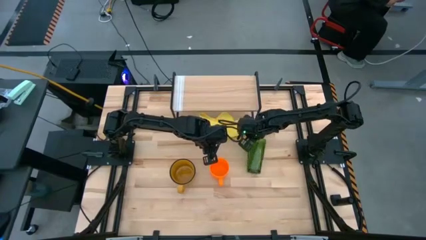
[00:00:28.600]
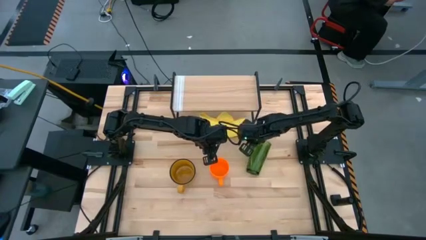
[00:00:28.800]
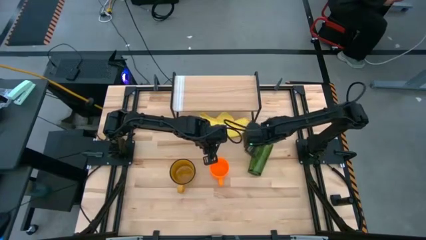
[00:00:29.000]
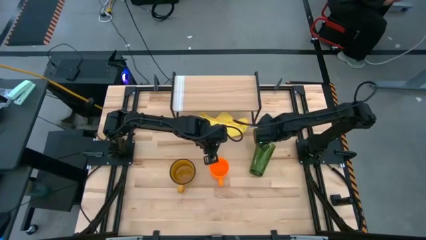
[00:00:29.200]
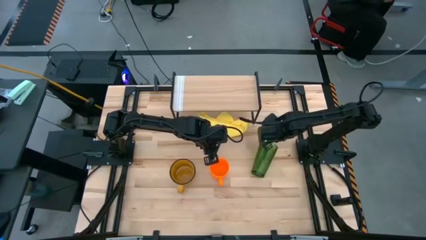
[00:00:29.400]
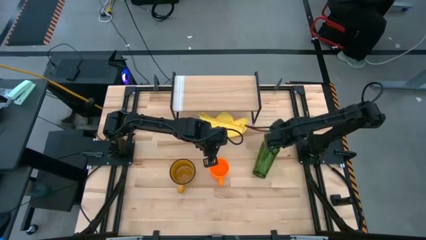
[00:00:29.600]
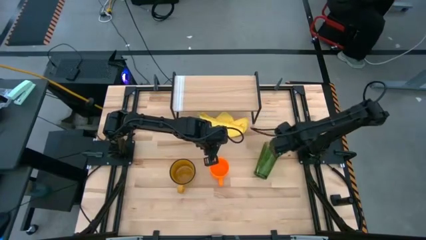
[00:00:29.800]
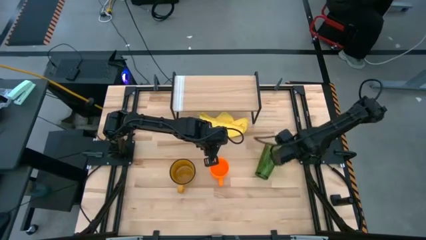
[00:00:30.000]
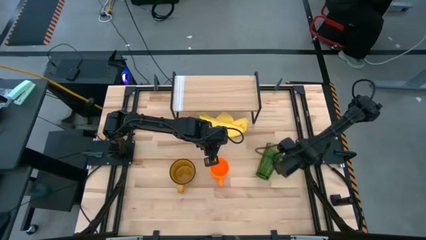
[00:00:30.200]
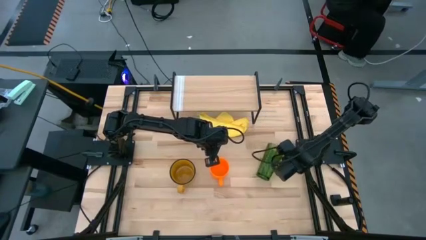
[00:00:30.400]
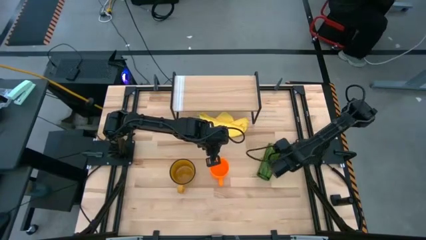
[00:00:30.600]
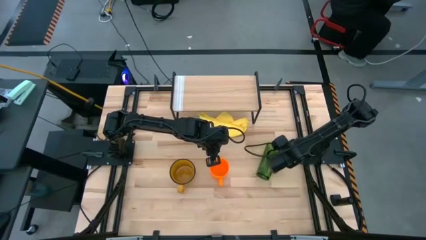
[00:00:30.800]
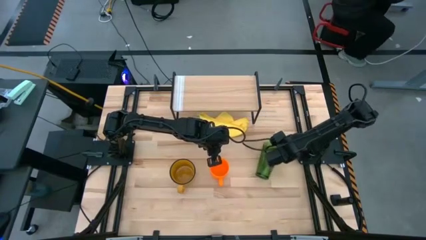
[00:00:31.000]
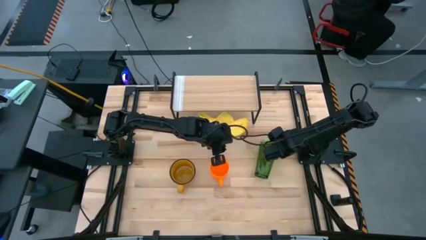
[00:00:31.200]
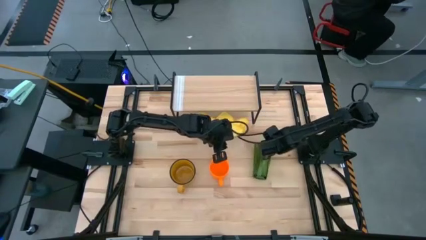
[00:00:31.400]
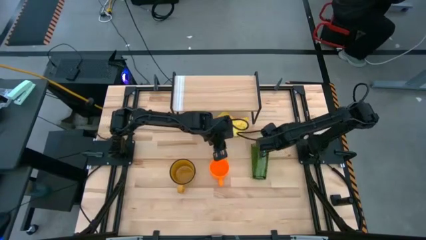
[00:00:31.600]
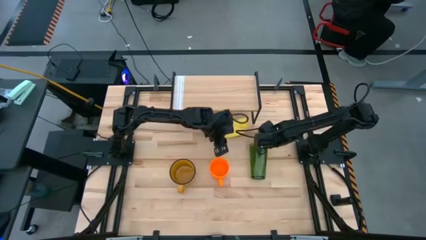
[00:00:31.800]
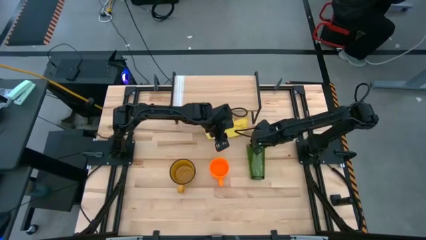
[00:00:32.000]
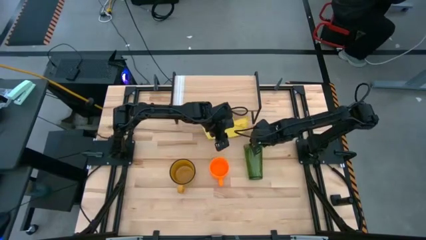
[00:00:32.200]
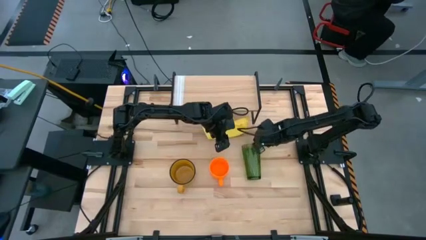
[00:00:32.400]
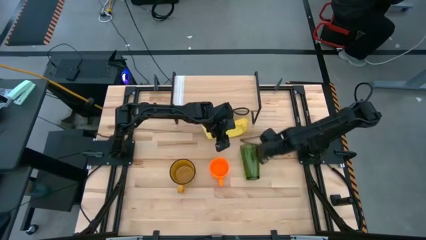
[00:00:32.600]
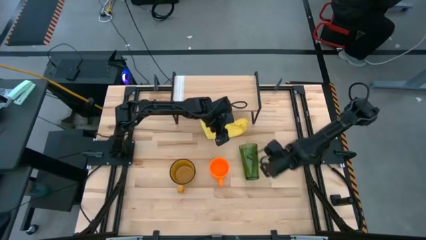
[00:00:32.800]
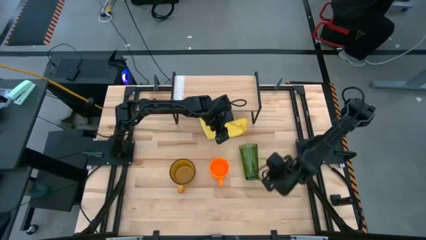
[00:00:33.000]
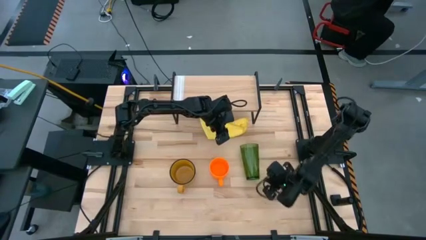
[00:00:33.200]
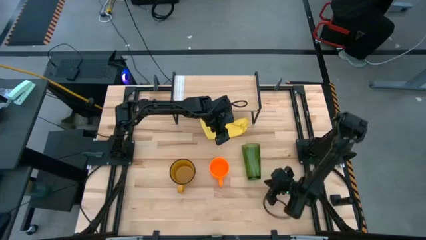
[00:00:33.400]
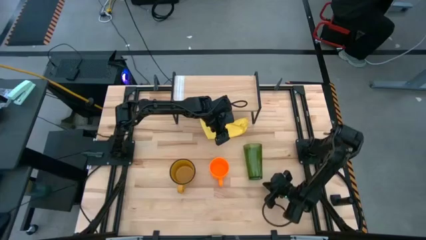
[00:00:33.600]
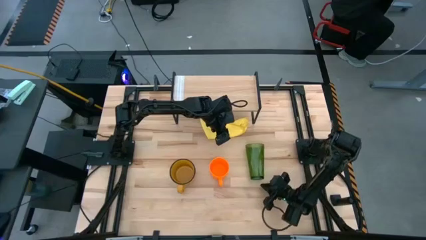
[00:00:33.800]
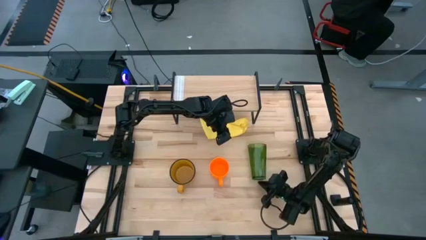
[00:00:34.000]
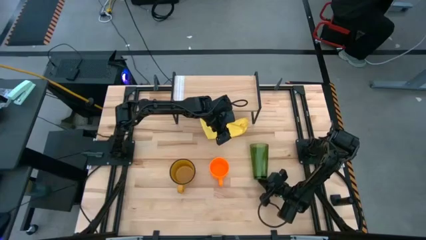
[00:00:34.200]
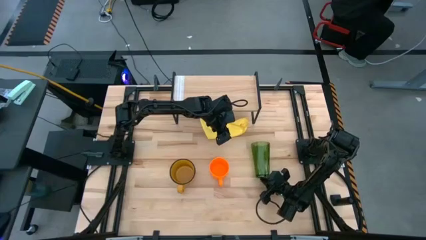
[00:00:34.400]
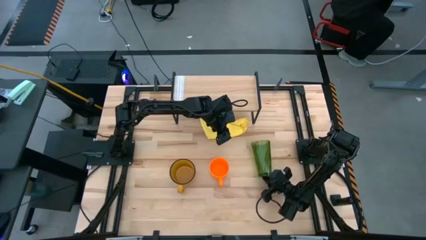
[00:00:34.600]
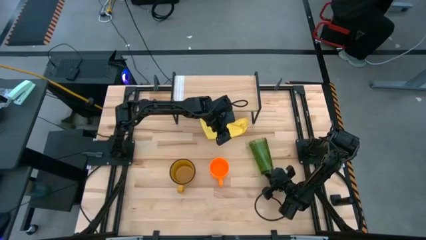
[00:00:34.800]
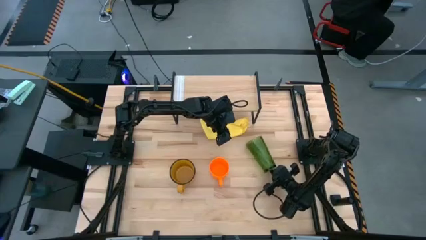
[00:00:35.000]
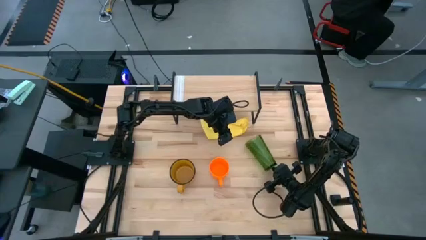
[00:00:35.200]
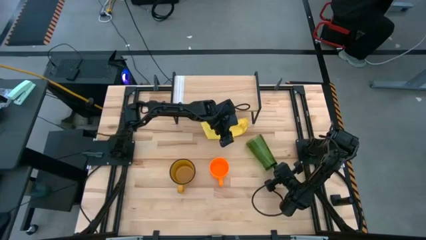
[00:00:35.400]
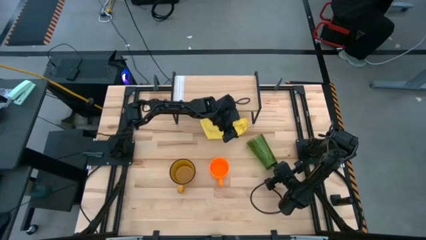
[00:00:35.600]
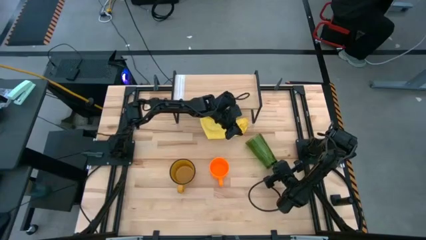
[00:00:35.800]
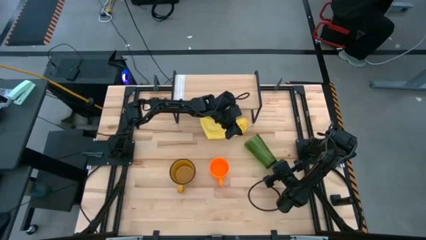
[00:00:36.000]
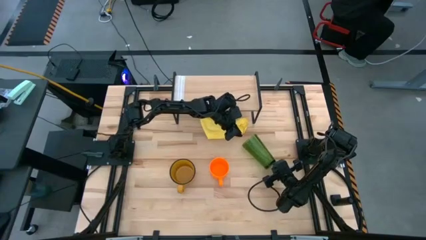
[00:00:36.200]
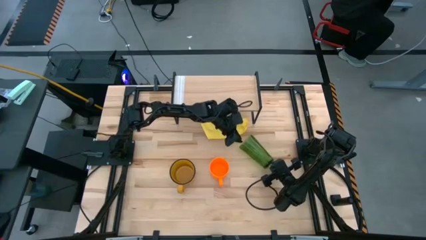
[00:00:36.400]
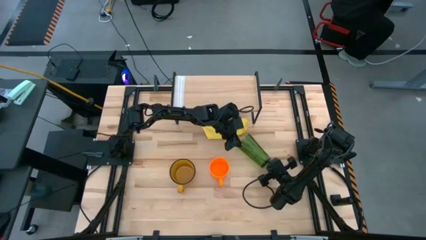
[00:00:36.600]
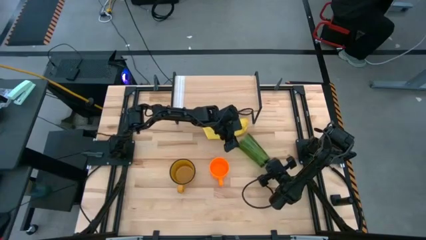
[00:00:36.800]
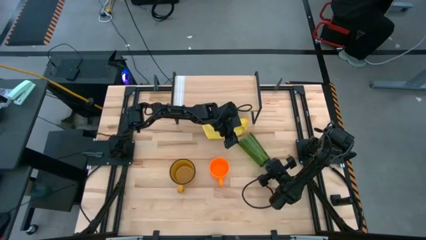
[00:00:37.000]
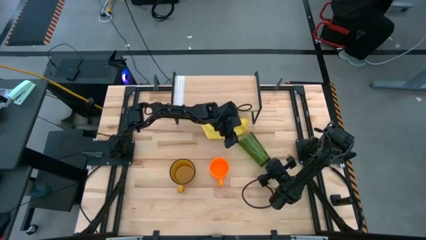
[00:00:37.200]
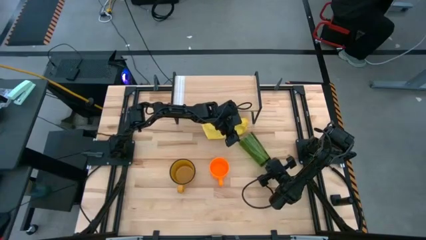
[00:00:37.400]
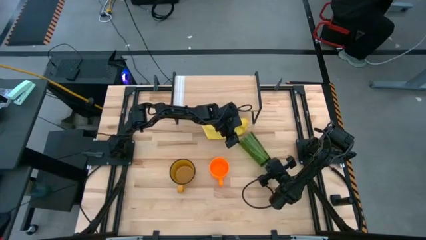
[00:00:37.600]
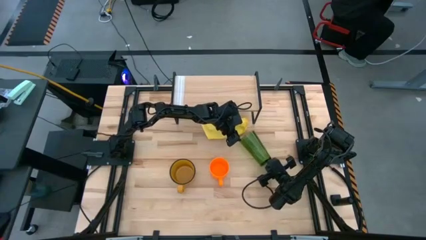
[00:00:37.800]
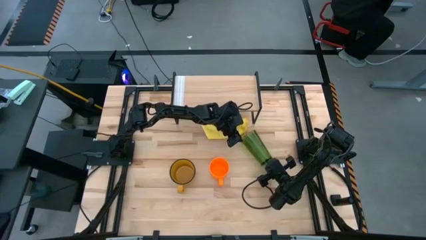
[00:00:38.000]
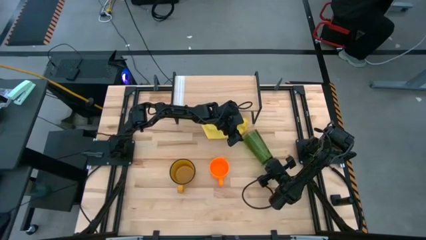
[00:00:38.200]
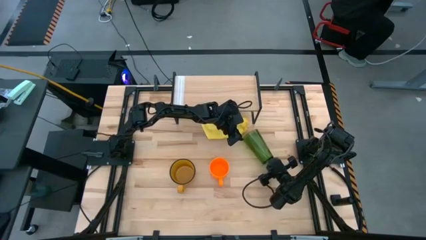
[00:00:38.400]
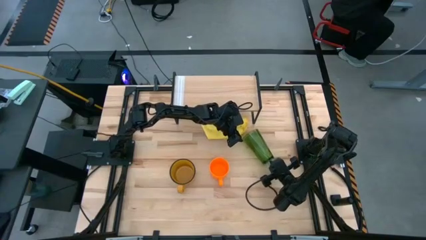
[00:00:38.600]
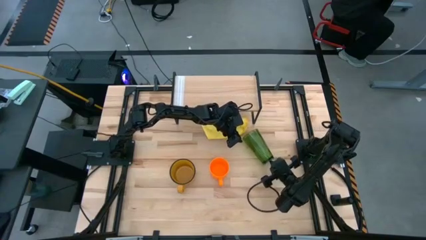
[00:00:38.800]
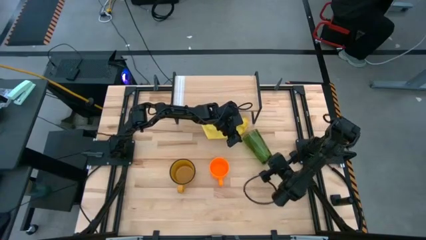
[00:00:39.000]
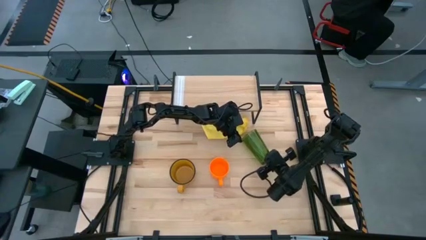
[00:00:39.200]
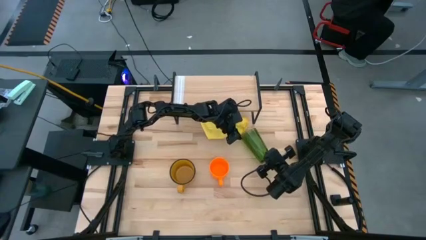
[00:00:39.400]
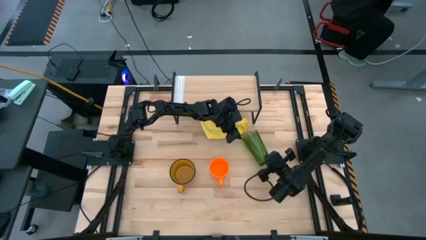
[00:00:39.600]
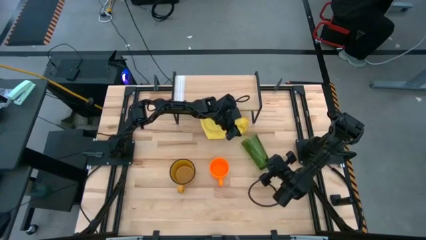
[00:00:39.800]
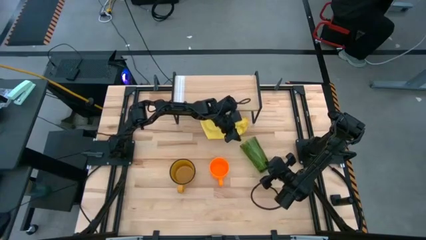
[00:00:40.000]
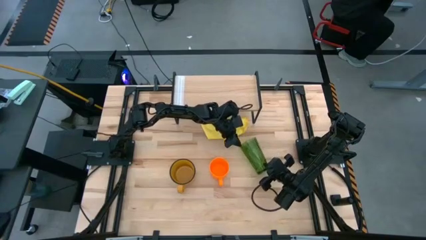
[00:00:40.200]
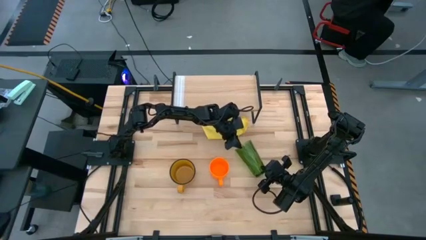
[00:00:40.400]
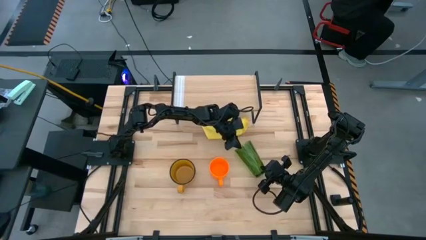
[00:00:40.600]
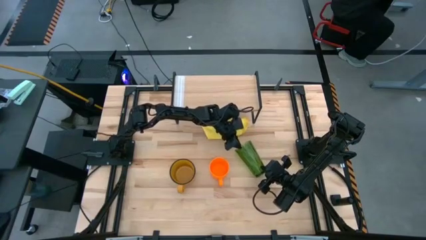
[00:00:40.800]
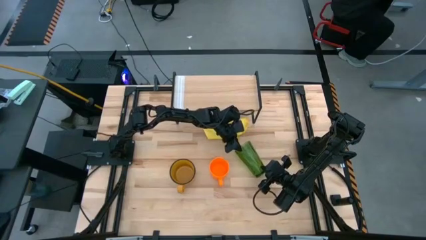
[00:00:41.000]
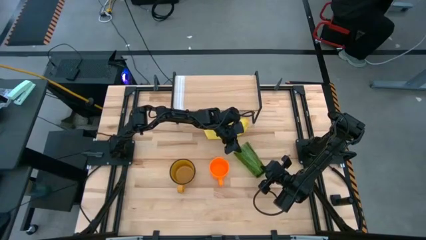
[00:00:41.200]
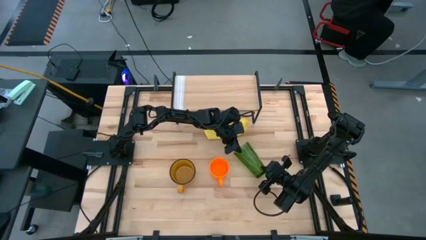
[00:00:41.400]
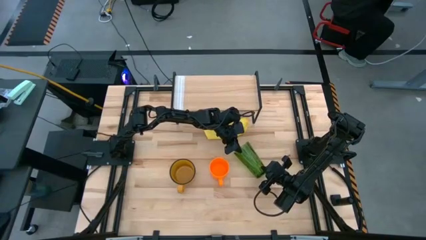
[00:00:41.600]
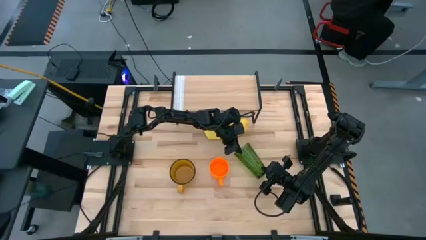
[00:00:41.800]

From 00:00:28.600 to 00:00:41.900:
Task: Stack small to large cups/mugs on shelf
Put the green cup on the shelf
